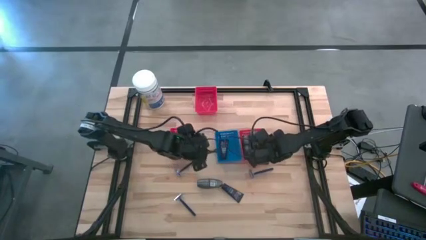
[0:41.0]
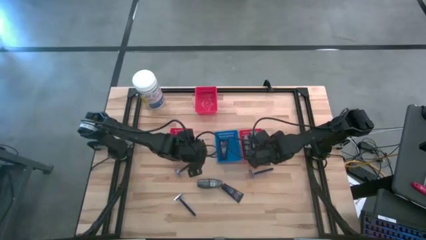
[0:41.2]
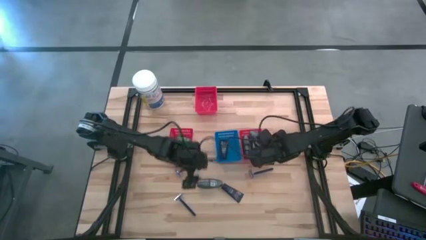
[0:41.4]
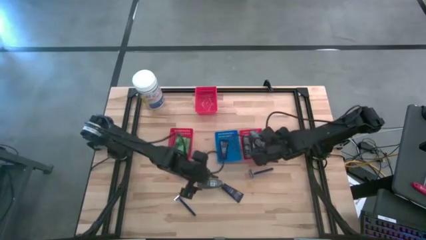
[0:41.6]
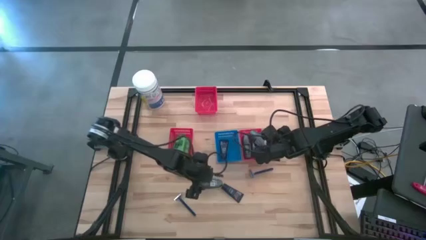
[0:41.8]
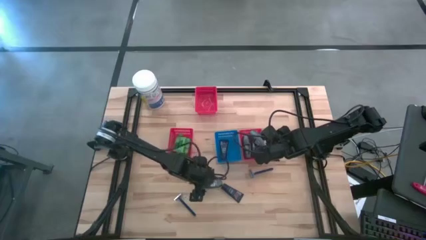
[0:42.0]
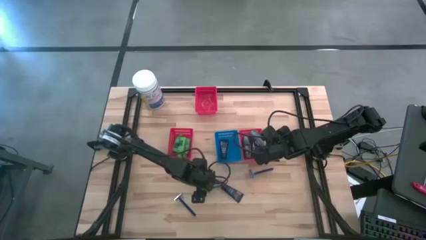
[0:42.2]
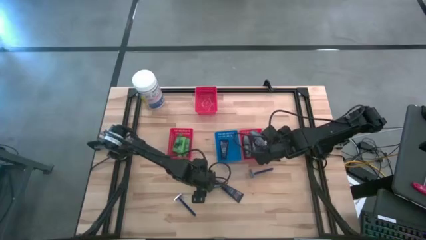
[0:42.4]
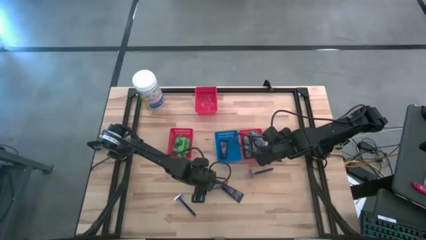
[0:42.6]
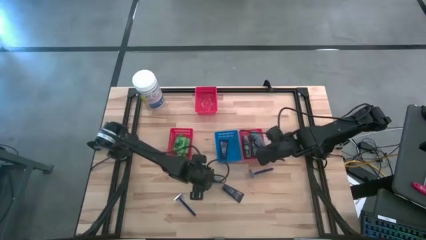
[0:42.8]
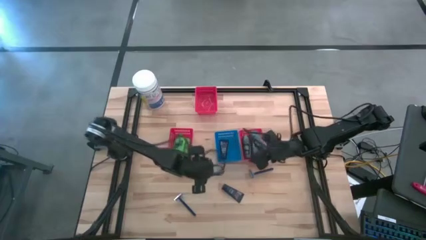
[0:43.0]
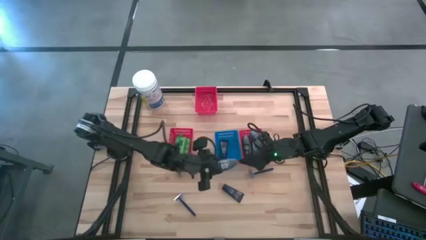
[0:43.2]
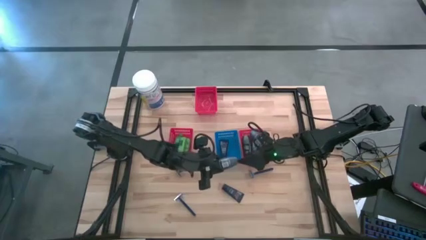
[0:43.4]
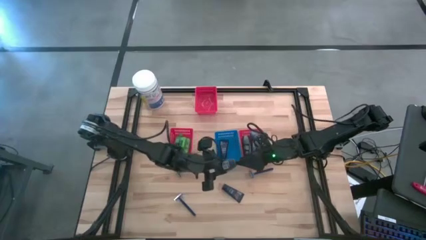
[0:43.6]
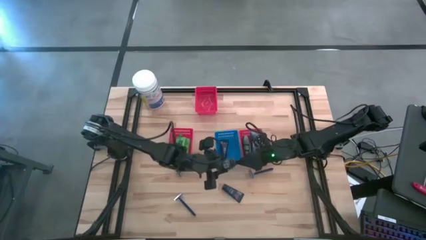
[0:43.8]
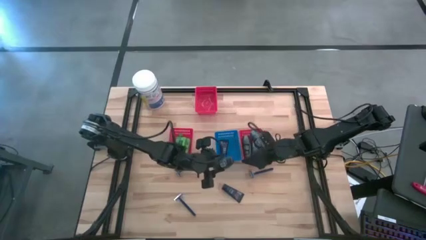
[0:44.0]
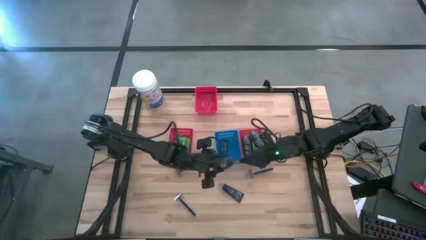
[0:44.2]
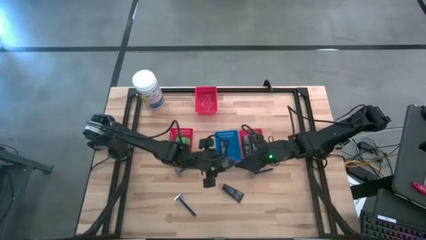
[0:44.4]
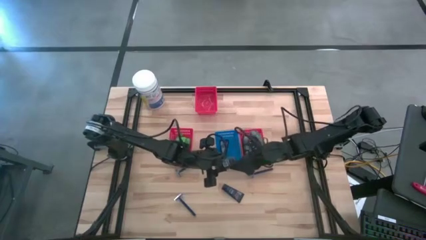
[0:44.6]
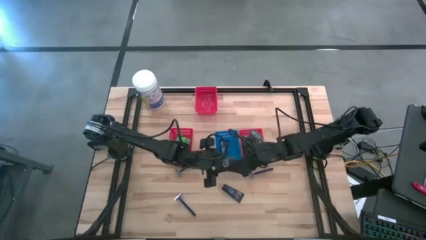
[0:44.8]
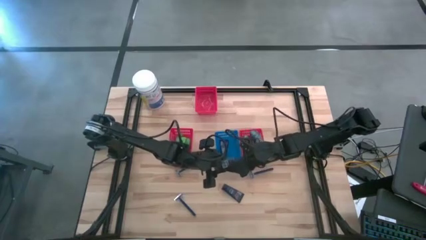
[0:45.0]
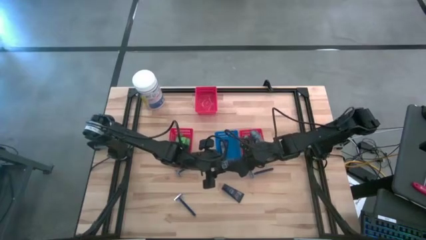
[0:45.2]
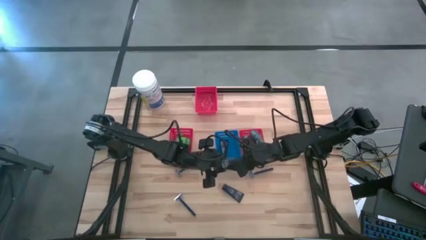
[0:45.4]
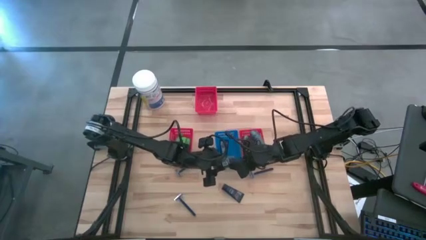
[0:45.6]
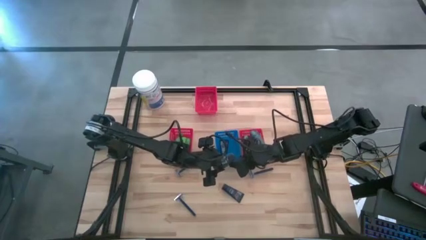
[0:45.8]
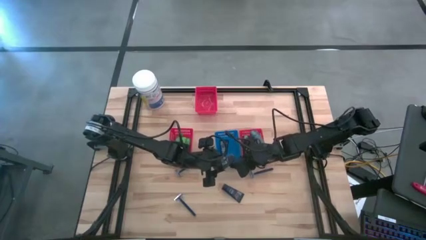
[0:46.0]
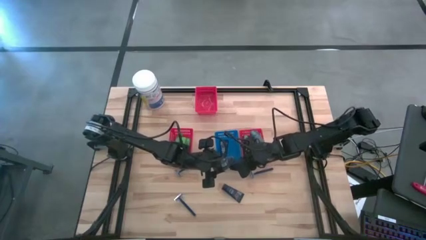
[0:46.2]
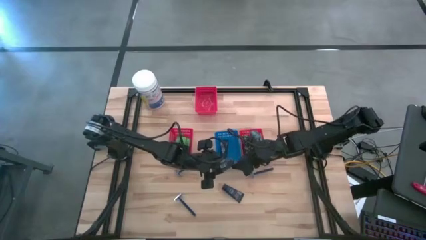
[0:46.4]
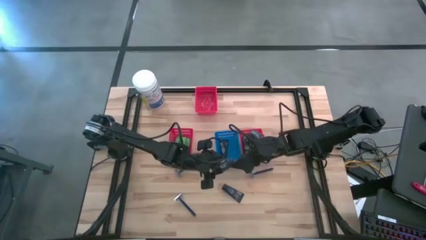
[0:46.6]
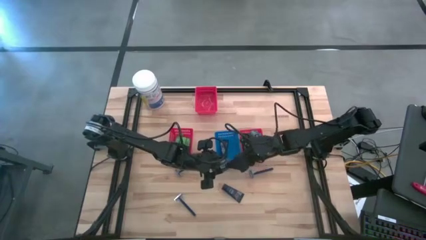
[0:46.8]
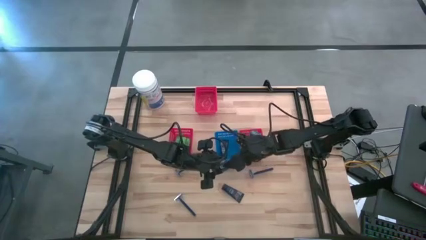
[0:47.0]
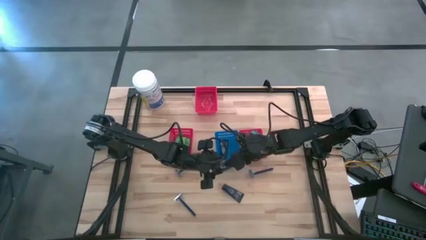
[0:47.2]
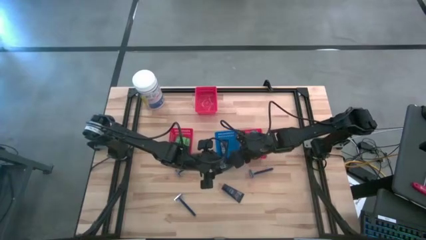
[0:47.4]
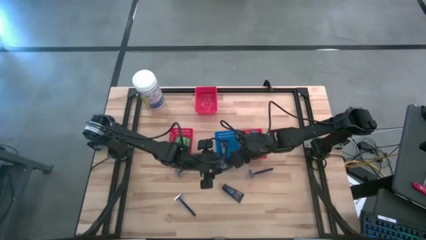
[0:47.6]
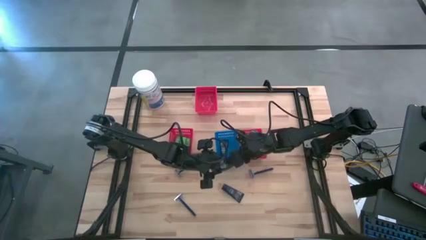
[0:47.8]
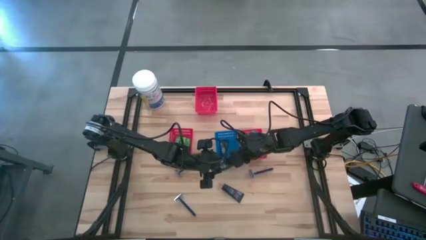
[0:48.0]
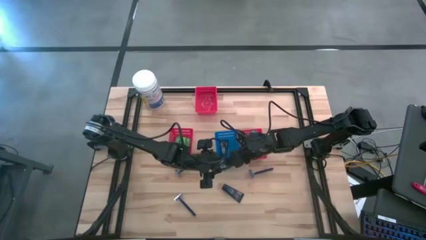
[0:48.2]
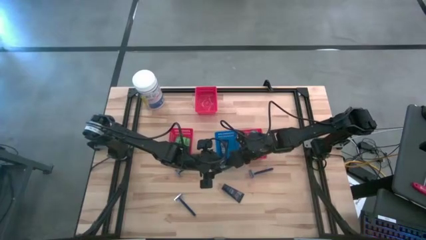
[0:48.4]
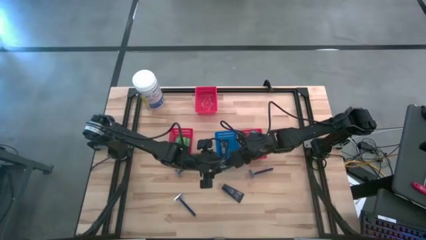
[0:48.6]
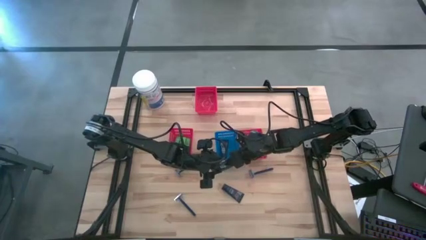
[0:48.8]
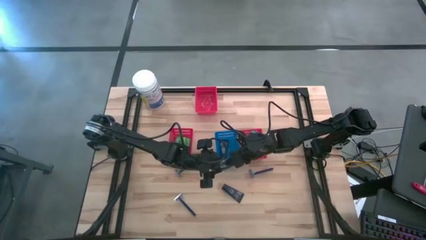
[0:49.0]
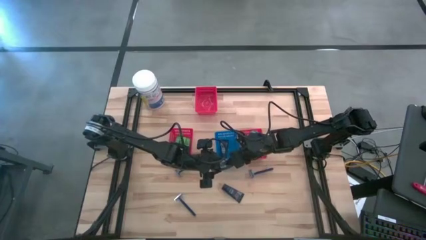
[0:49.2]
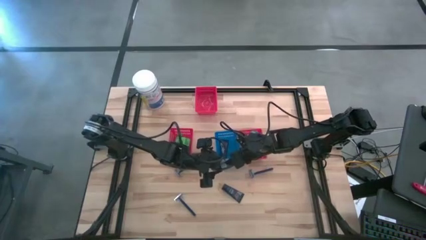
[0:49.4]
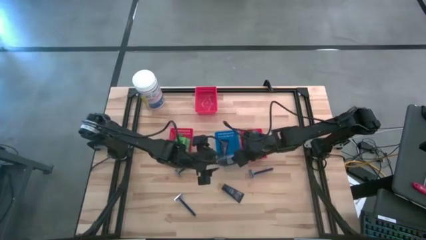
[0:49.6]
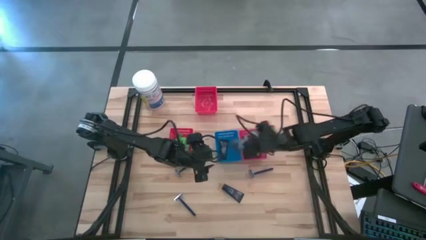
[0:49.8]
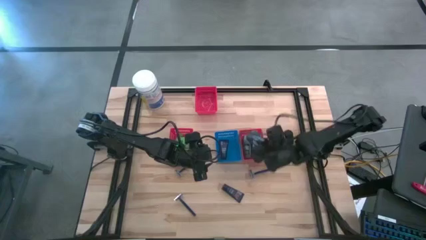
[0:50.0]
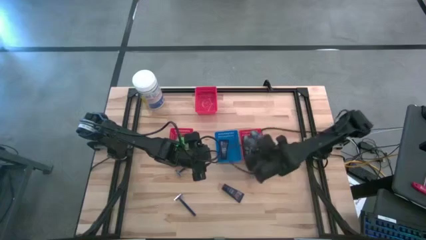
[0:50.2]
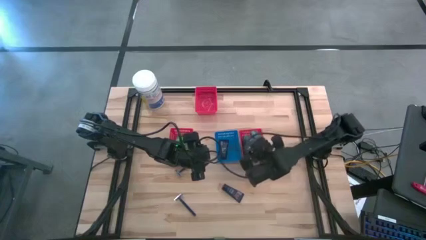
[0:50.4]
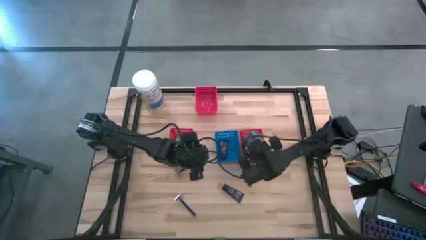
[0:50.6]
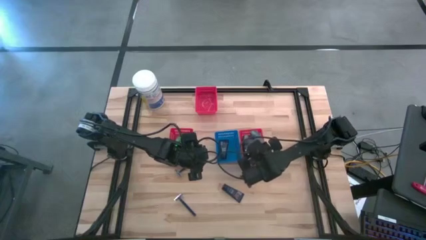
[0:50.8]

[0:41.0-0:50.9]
Task: Pick & Place Travel size toiletries
Put the black deodorant into the right red bin

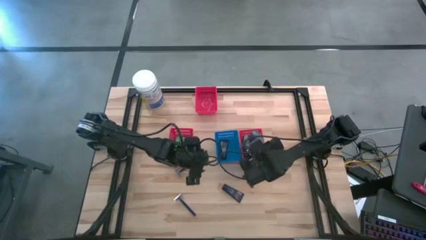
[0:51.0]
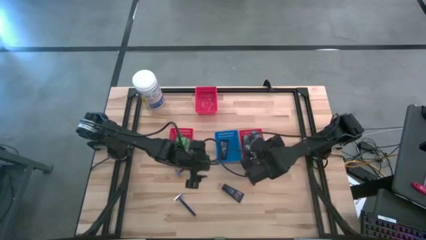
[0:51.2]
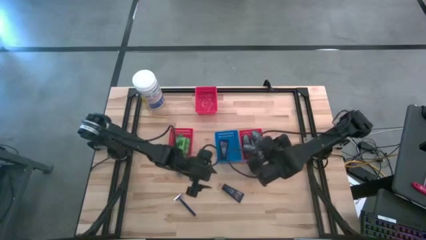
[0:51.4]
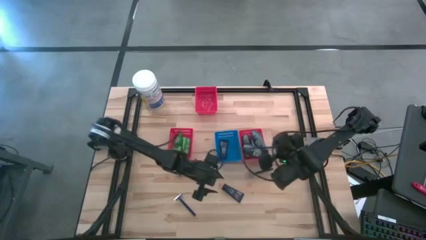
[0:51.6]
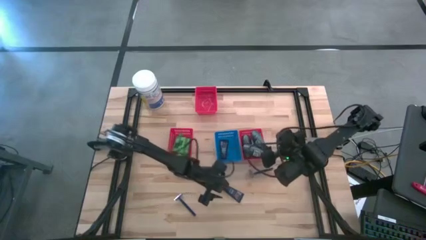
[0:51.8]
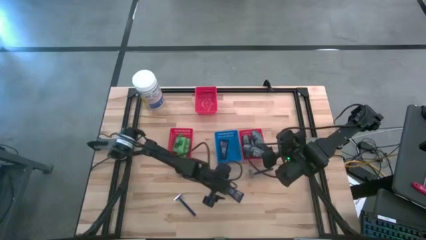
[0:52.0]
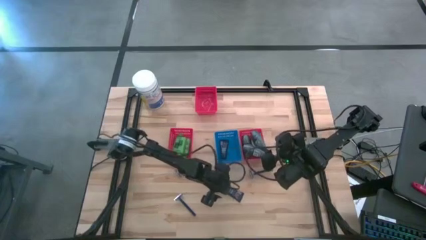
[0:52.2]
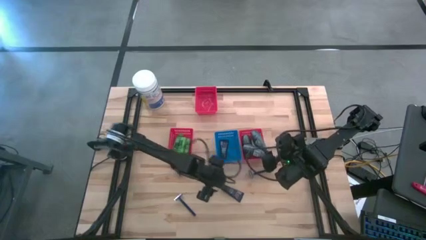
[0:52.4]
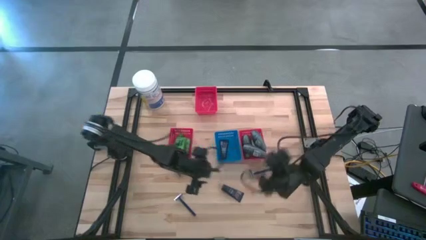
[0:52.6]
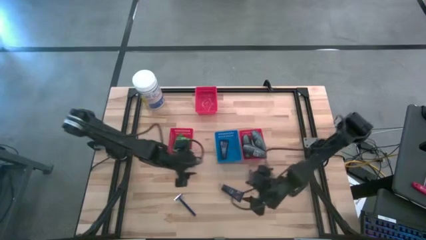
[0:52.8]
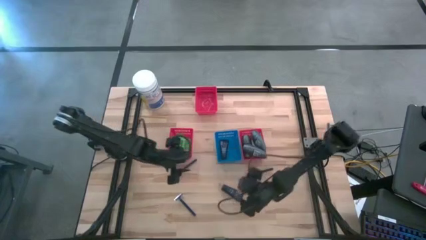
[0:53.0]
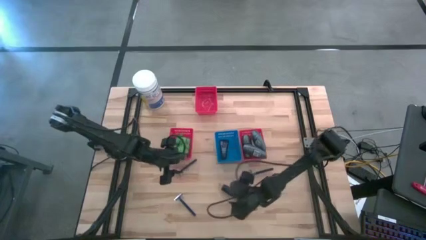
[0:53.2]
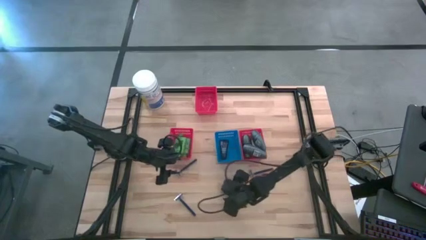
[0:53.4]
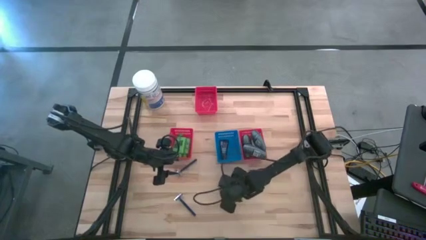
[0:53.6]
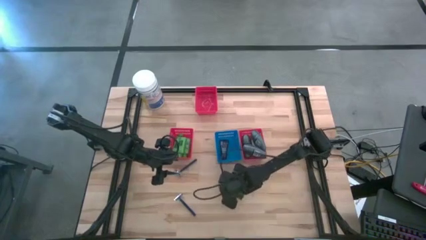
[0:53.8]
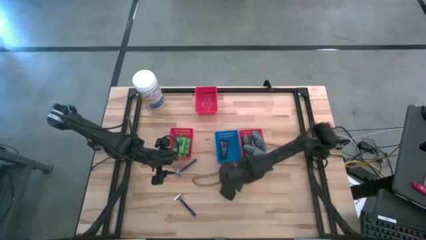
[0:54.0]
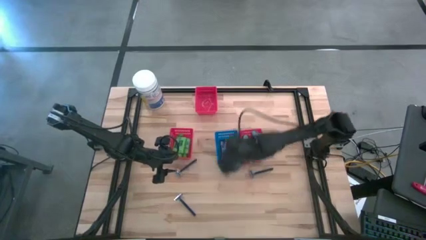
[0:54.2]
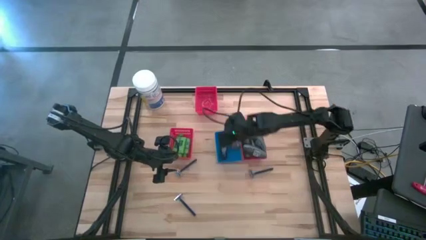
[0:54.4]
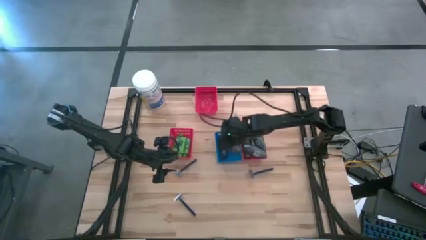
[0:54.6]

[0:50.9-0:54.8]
Put the blue shave cream into the blue bin

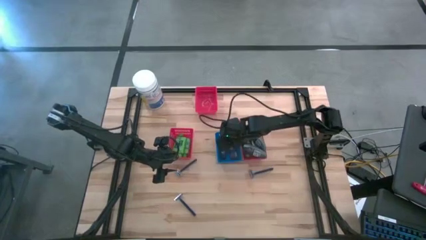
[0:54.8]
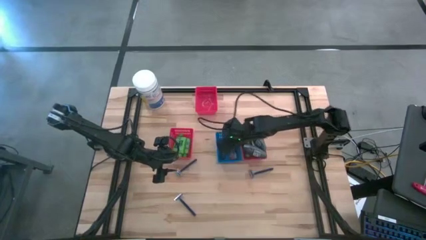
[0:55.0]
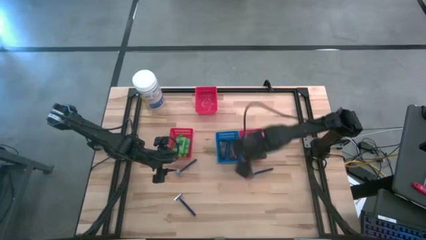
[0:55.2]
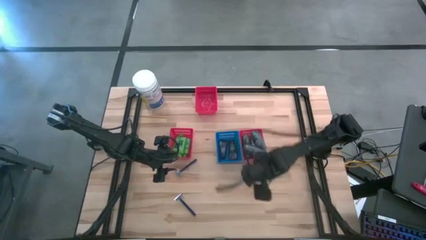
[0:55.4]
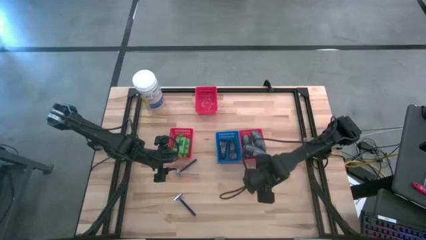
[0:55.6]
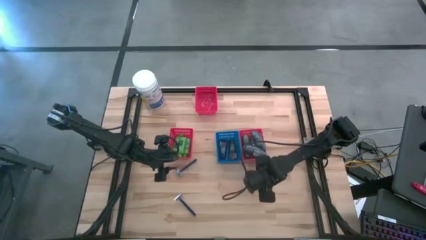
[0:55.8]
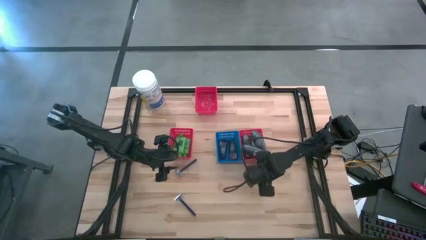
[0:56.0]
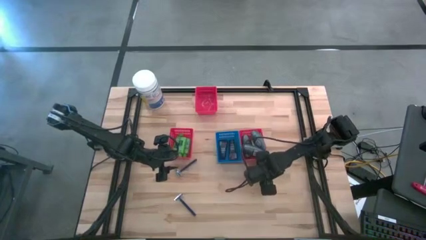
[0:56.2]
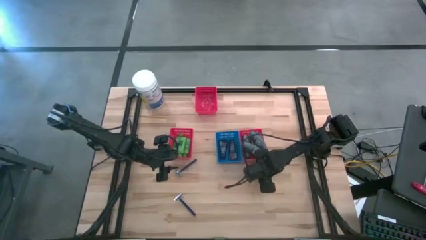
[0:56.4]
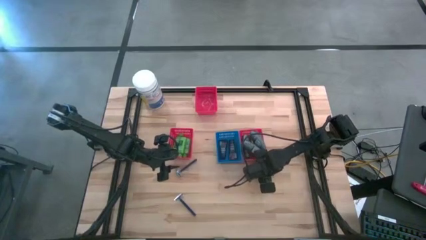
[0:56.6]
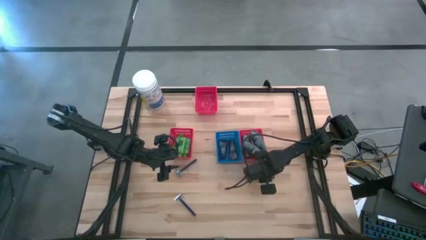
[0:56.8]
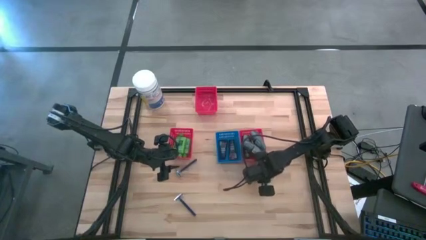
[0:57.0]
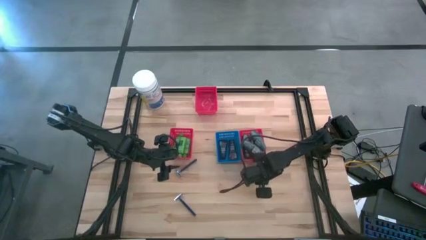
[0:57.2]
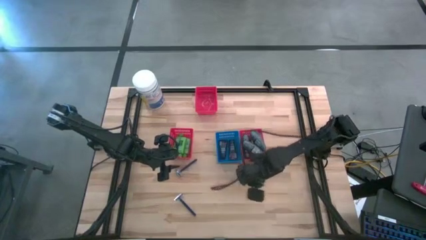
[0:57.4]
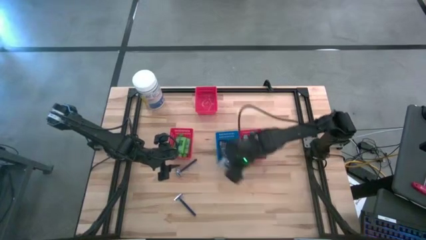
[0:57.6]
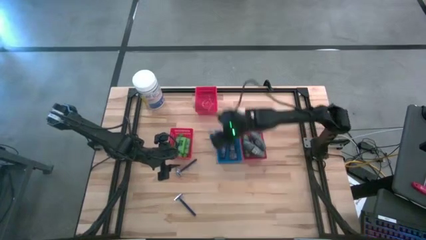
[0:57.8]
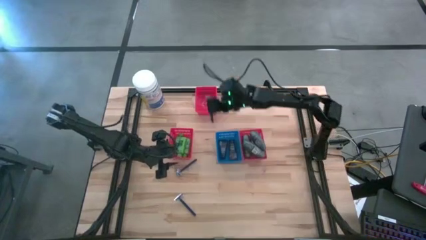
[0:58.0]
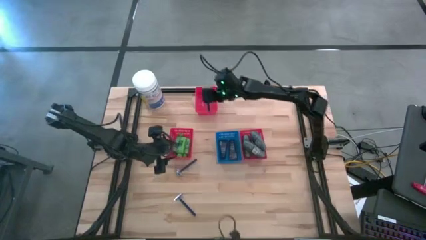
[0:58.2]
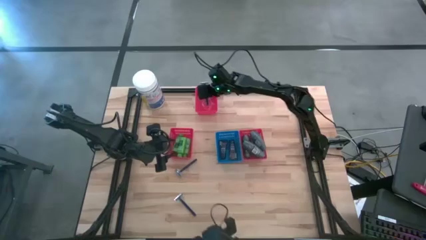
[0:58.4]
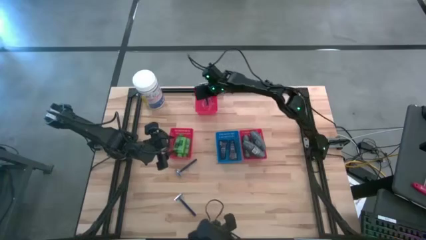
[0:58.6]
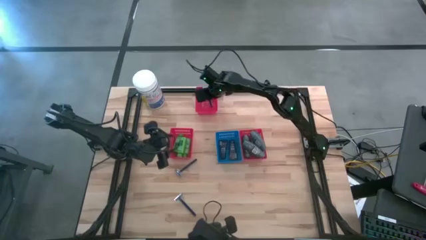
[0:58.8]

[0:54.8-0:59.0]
Put the blue razor into the top red bin
